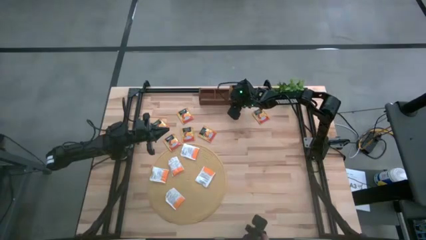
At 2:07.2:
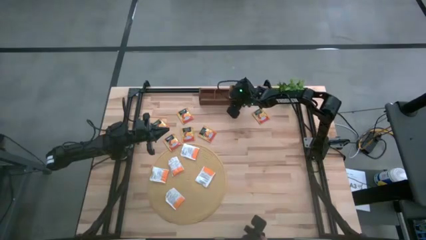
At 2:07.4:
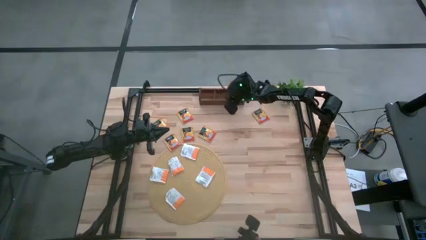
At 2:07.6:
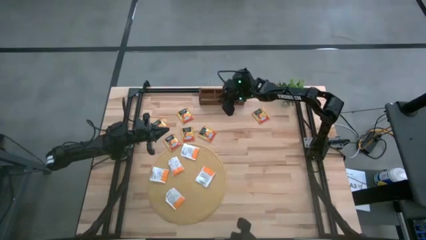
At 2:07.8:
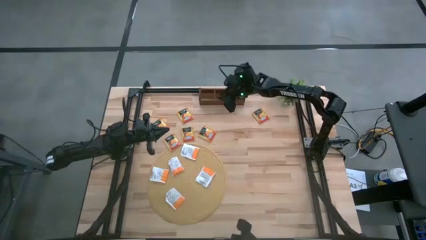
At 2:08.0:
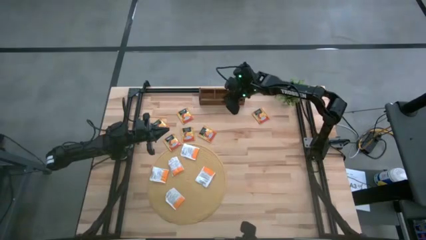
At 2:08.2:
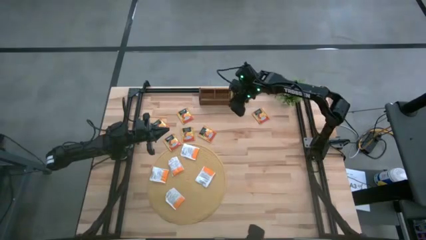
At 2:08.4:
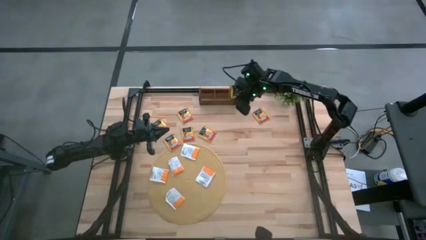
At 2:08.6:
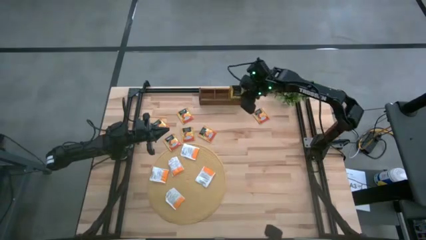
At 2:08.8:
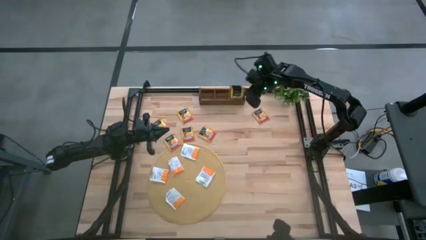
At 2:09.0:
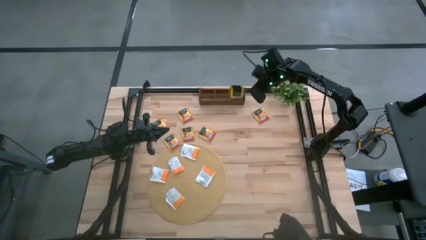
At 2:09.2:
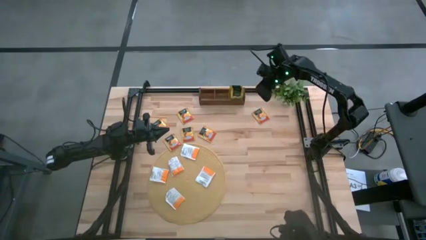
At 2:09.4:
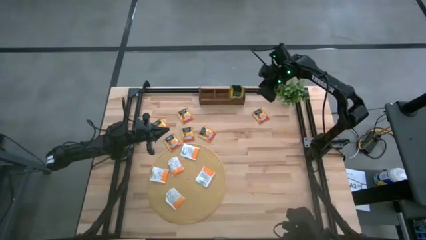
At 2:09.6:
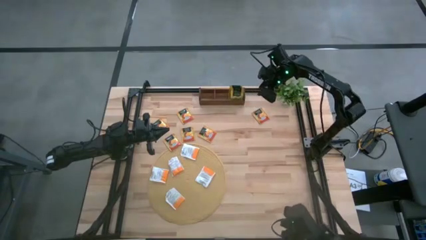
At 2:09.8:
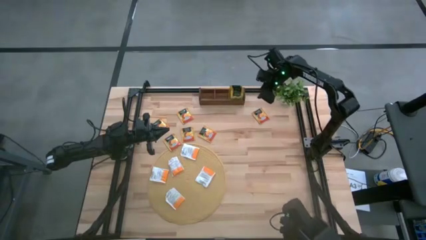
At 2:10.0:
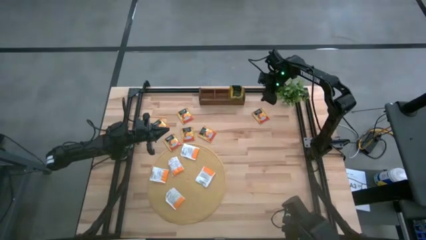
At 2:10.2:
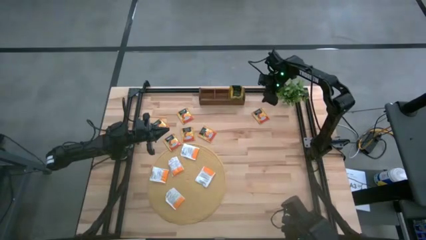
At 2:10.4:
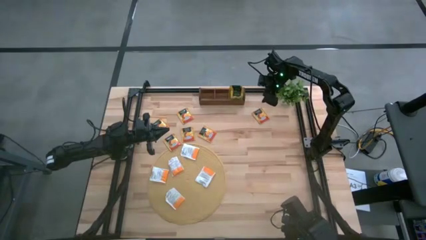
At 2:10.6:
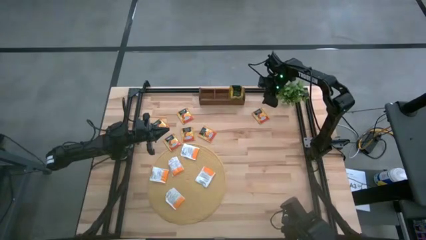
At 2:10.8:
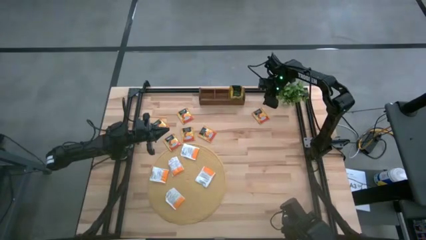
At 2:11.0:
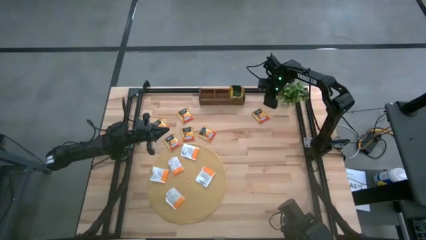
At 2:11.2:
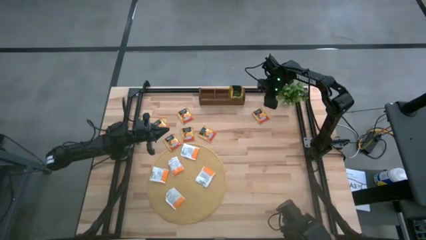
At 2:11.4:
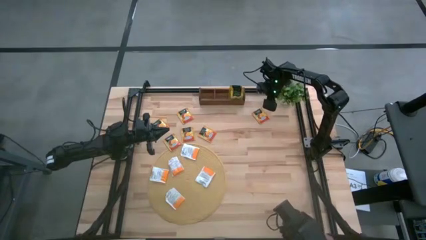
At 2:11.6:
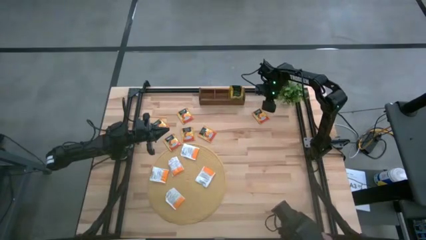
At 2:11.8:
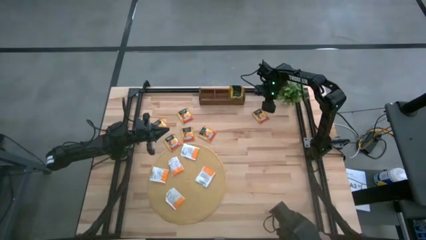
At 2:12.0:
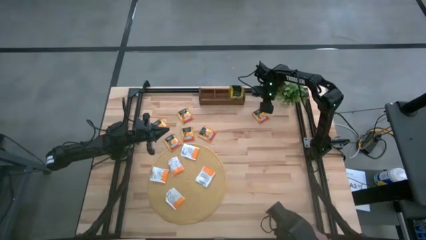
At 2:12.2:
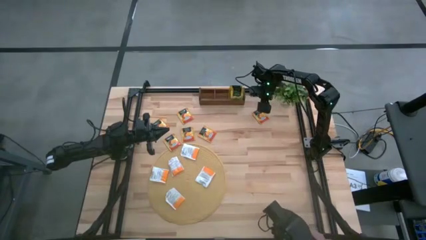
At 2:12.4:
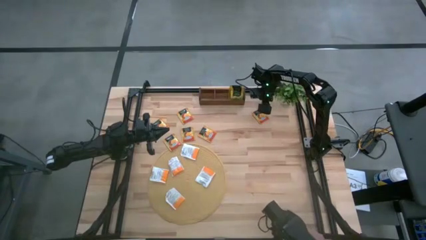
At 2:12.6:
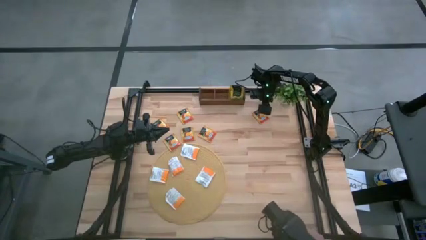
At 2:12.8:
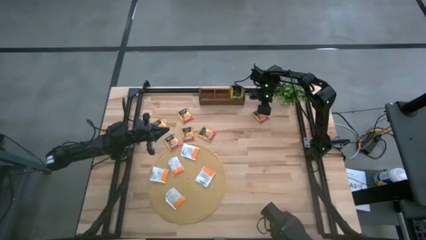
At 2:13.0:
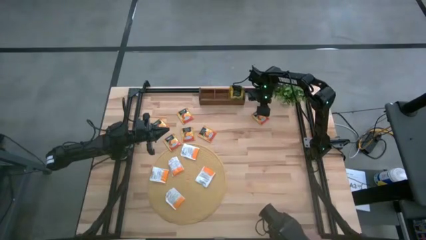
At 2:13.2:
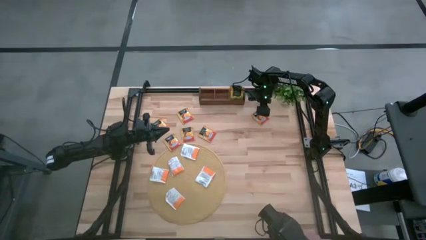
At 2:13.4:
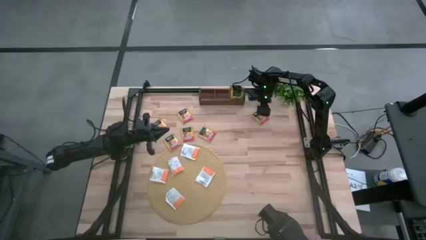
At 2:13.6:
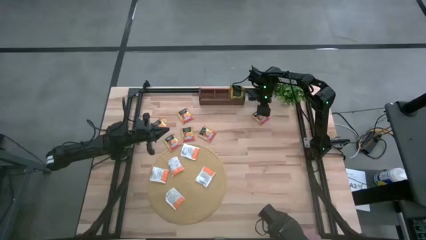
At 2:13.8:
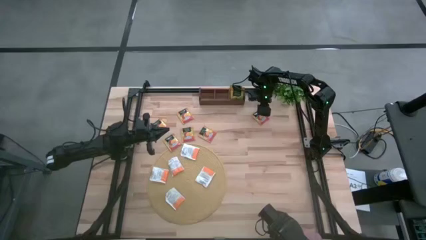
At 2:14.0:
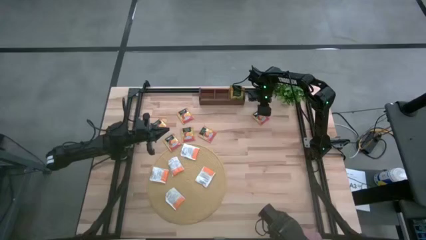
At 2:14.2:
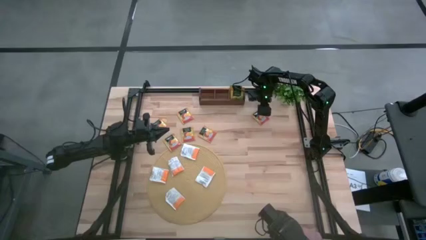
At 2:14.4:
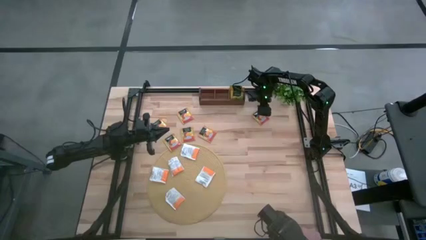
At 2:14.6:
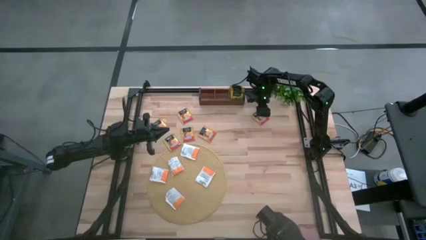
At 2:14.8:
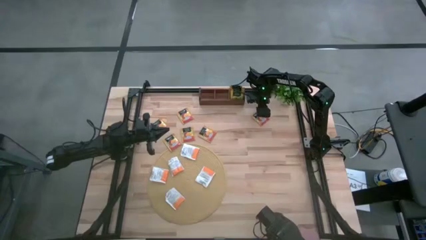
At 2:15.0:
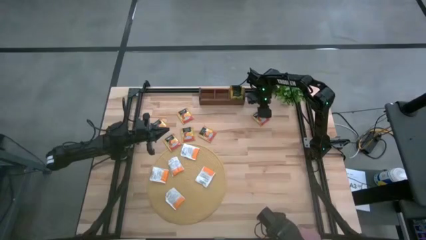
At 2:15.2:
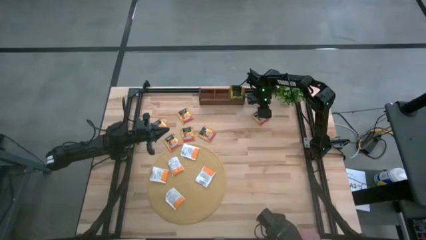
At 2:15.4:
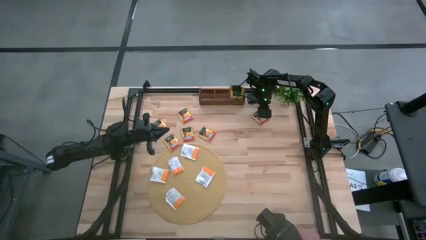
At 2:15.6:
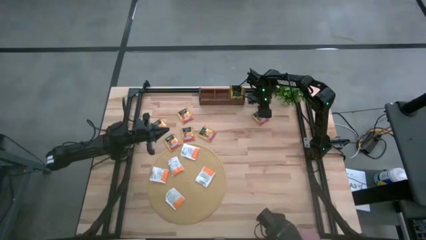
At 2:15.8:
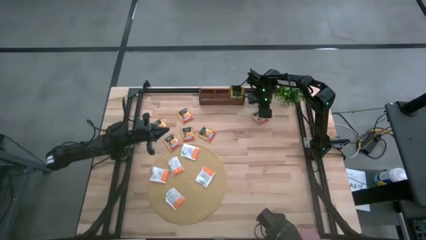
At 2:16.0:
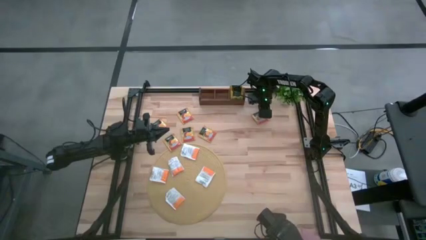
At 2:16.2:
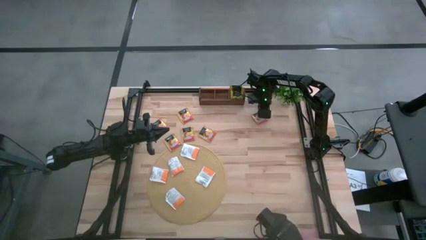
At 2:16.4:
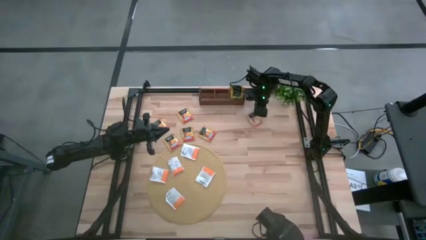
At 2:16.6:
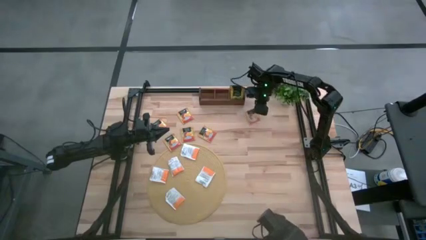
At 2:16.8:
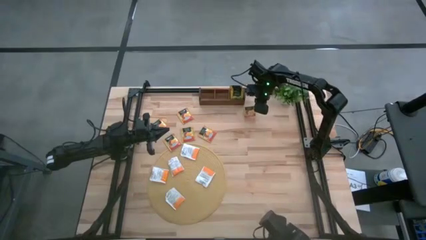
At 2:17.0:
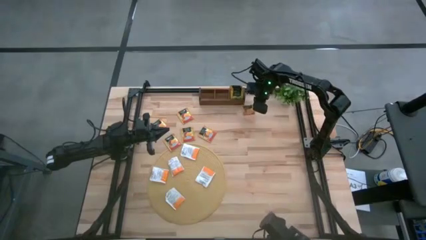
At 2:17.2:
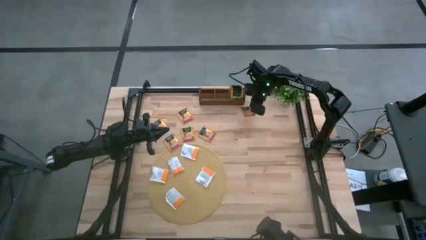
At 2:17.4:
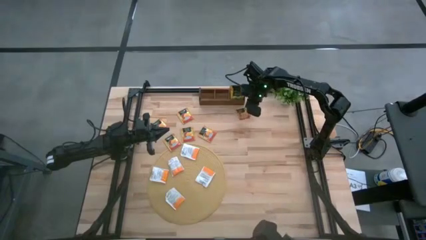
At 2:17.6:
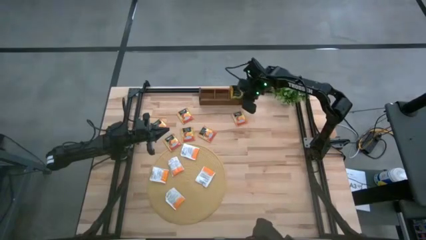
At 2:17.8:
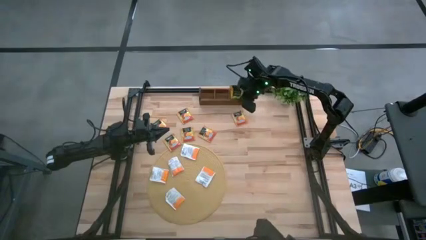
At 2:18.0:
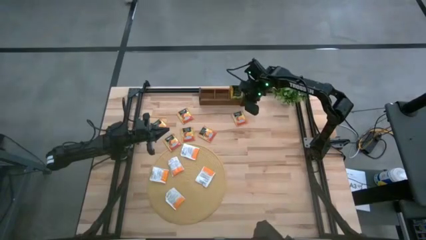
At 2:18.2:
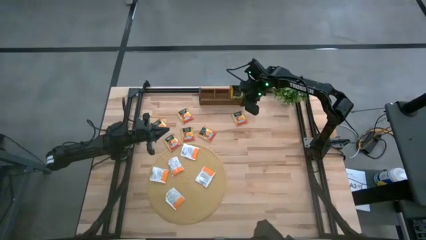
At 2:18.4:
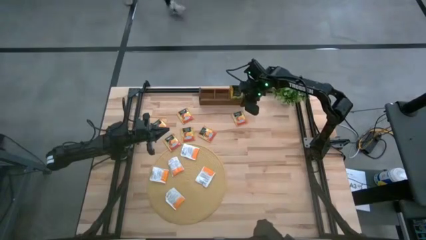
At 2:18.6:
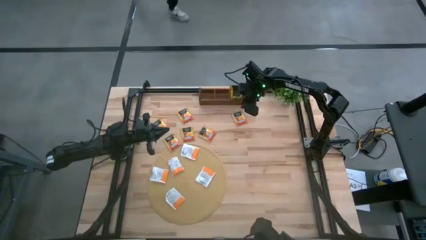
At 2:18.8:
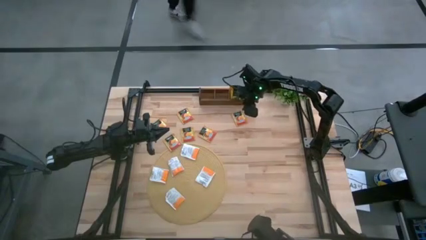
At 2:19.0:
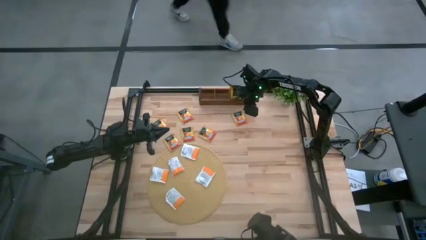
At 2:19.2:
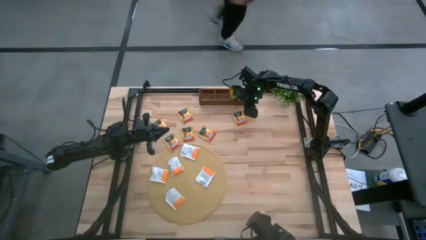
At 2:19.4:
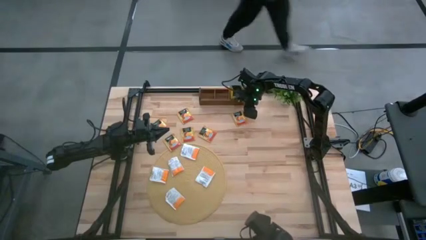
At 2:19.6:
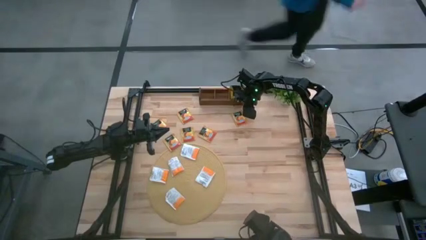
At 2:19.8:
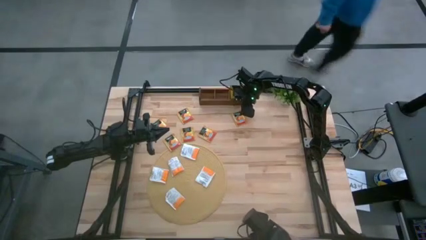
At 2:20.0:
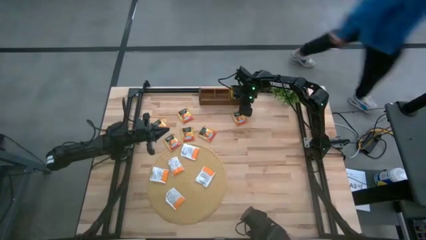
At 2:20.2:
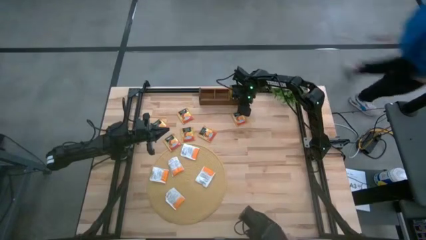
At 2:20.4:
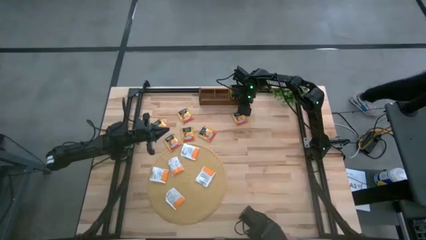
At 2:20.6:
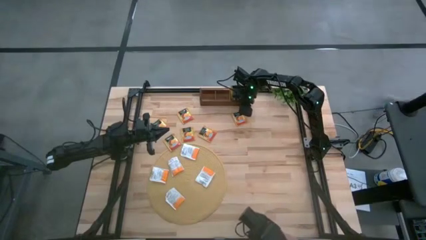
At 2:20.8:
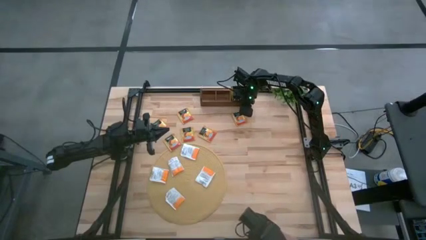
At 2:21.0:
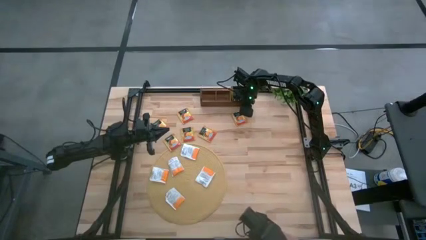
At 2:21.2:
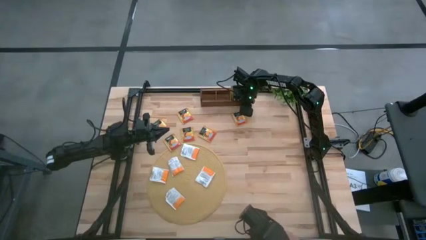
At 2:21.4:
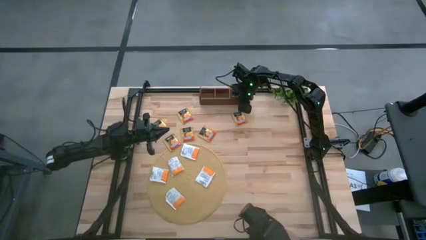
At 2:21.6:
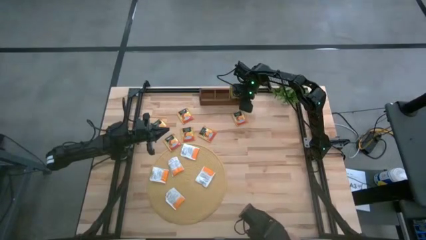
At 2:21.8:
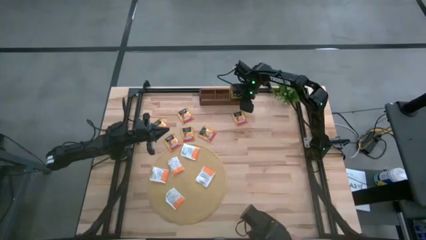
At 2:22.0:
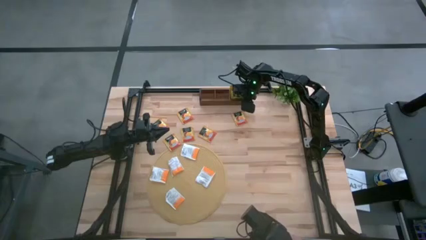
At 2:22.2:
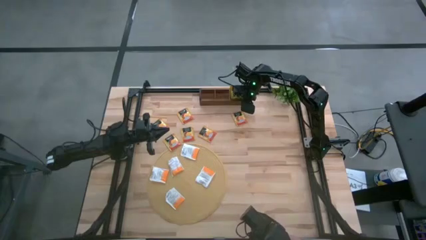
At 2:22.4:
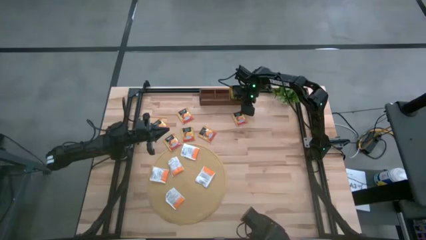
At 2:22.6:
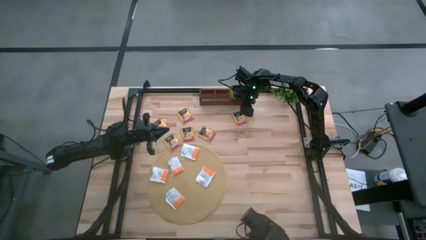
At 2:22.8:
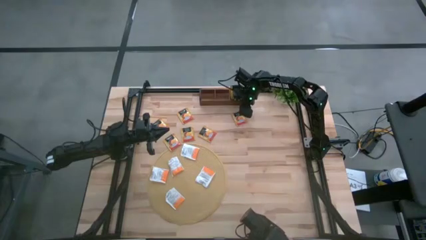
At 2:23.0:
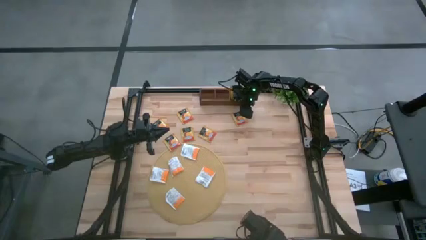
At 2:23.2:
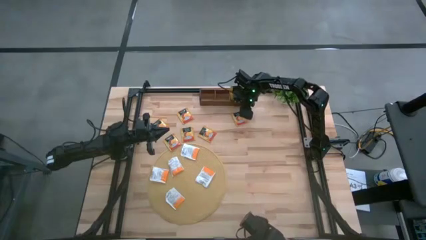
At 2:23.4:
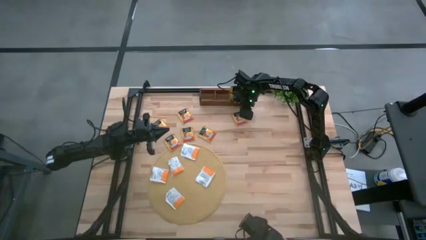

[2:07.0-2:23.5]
Task: Pick & Place Tea
Put the yellow tea bag into the middle slot of the wooden organizer
